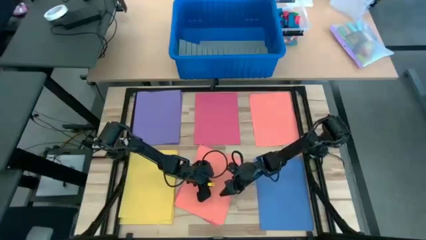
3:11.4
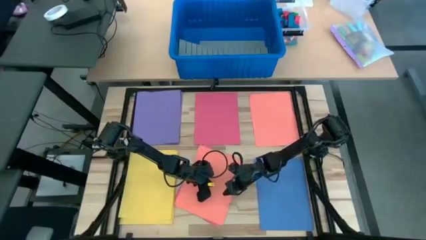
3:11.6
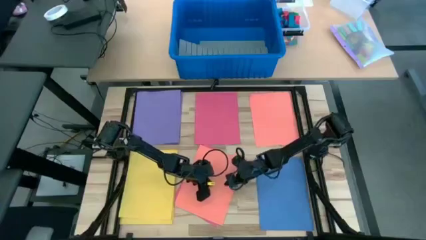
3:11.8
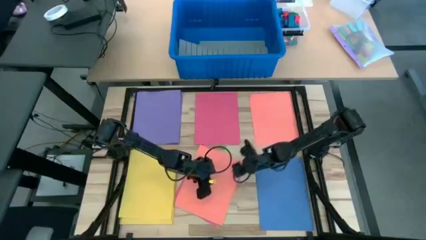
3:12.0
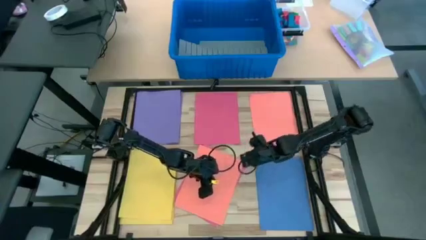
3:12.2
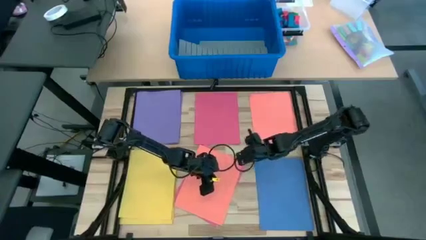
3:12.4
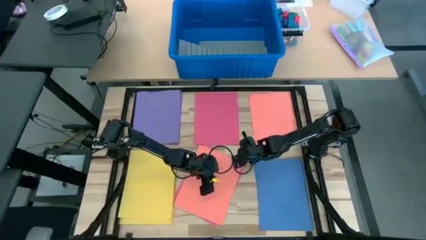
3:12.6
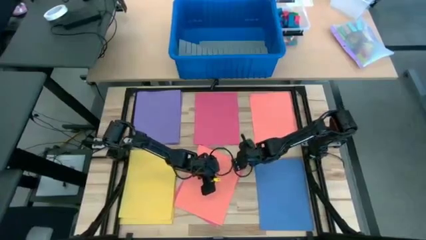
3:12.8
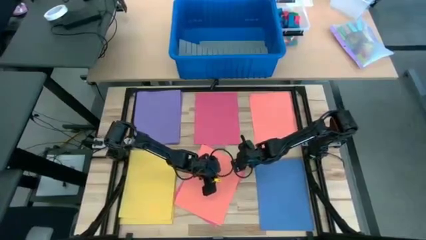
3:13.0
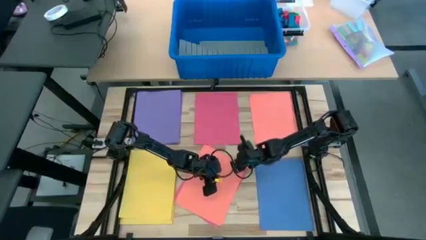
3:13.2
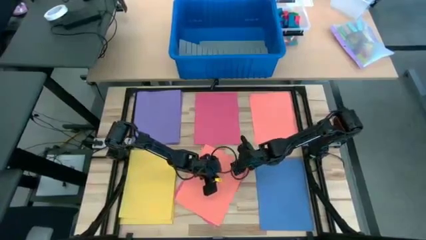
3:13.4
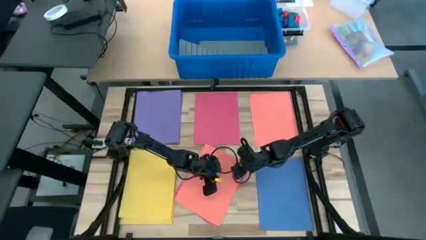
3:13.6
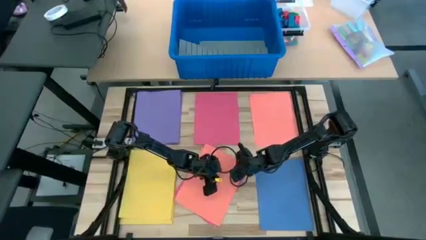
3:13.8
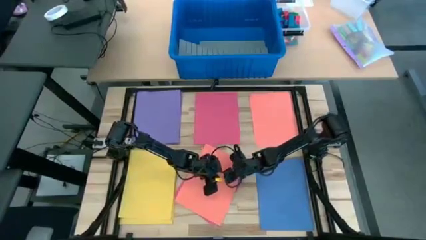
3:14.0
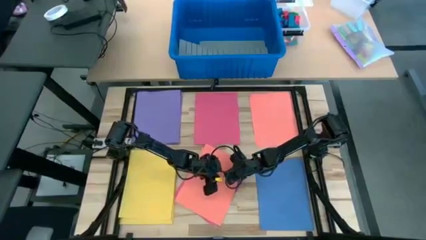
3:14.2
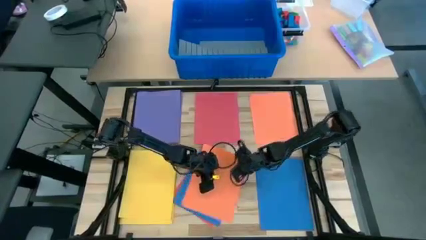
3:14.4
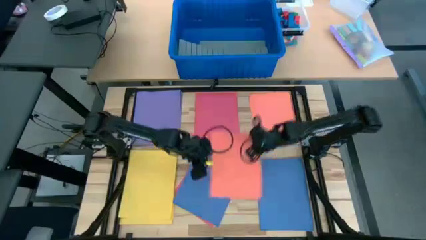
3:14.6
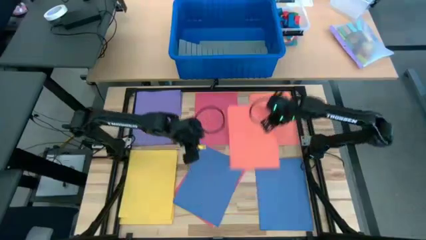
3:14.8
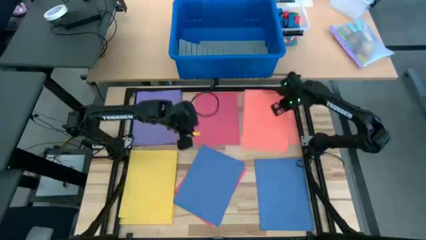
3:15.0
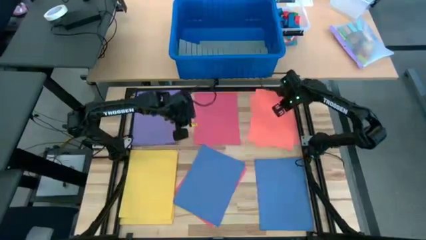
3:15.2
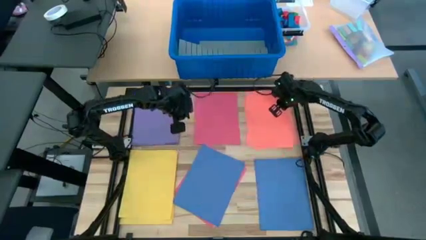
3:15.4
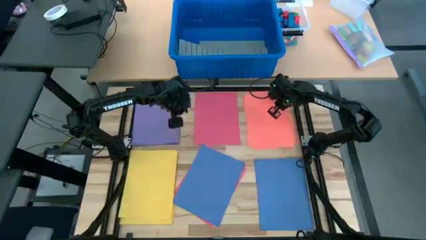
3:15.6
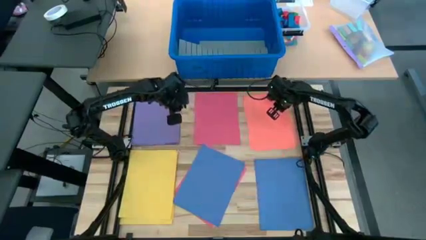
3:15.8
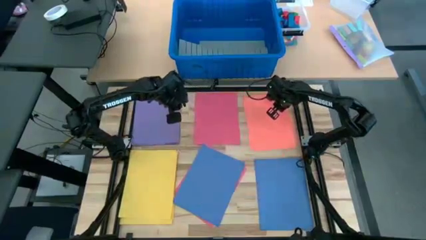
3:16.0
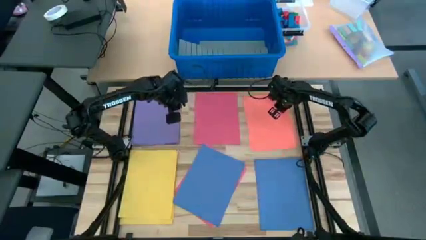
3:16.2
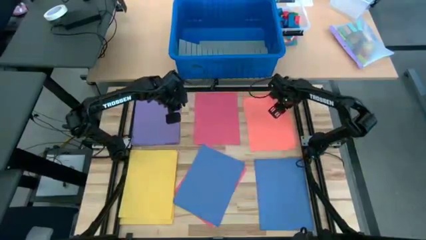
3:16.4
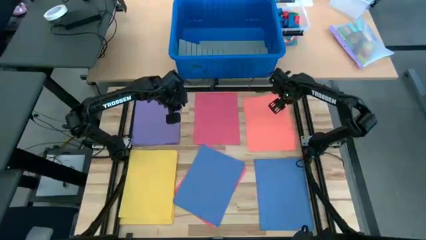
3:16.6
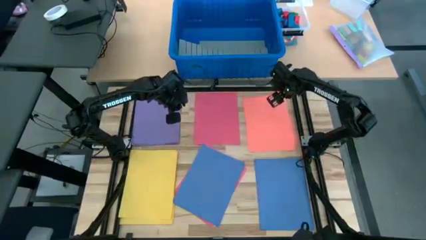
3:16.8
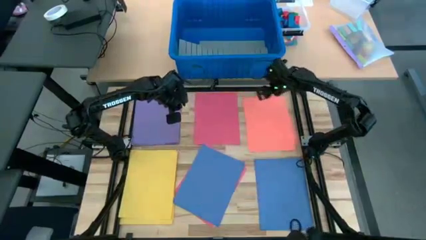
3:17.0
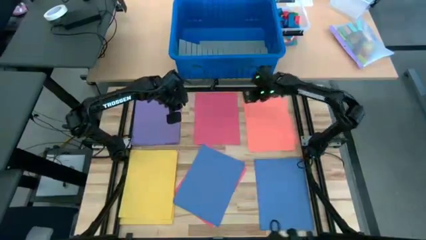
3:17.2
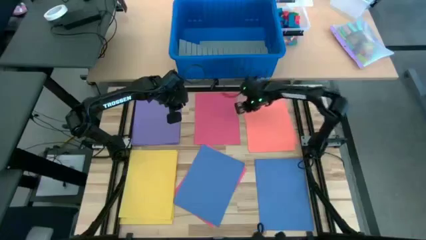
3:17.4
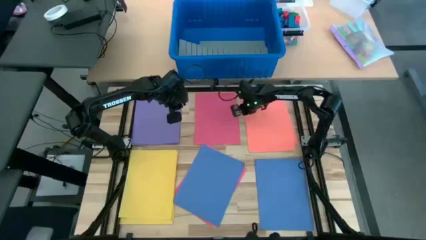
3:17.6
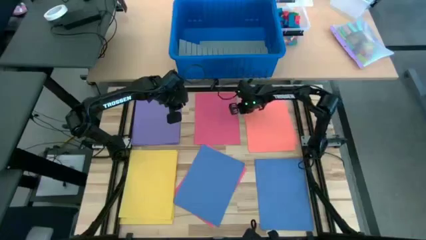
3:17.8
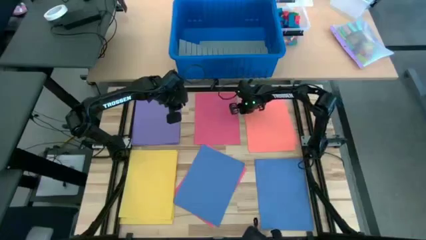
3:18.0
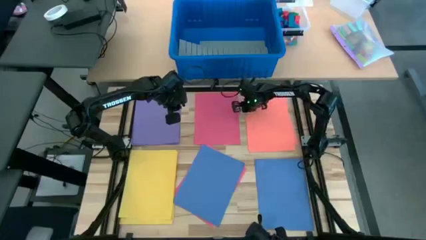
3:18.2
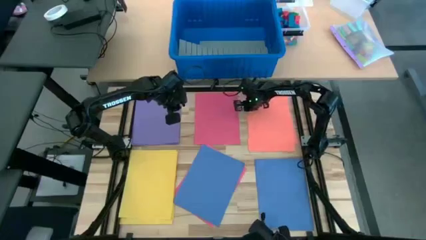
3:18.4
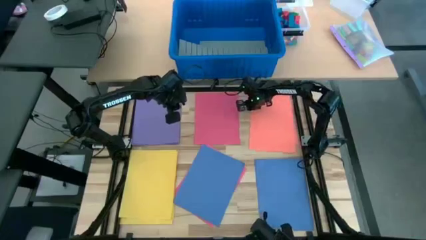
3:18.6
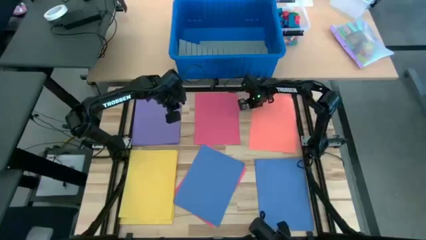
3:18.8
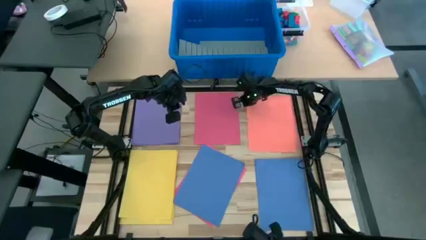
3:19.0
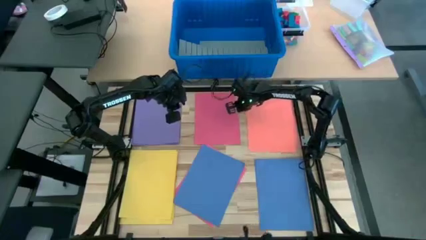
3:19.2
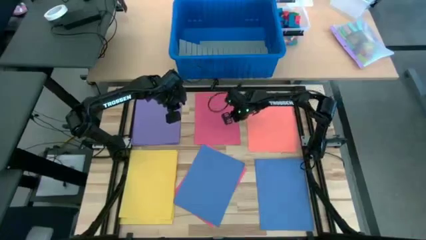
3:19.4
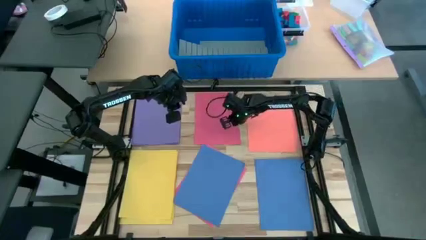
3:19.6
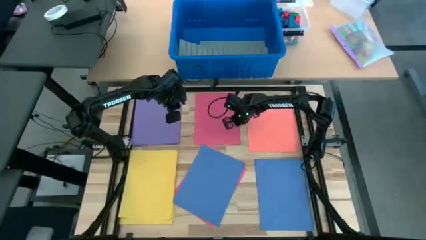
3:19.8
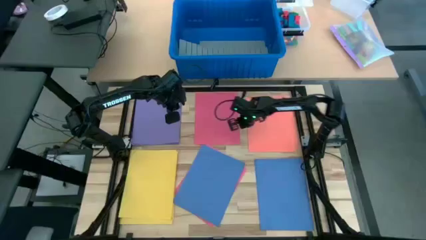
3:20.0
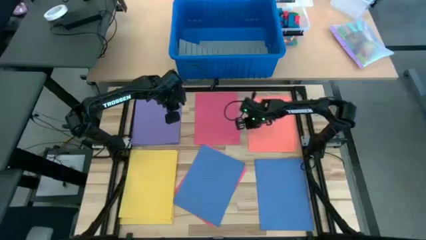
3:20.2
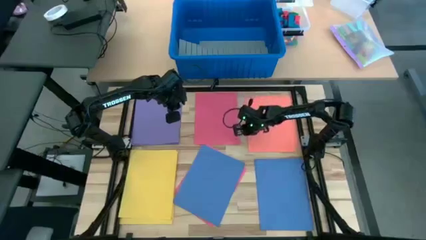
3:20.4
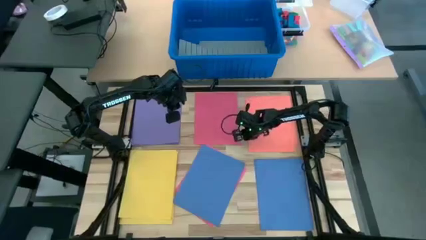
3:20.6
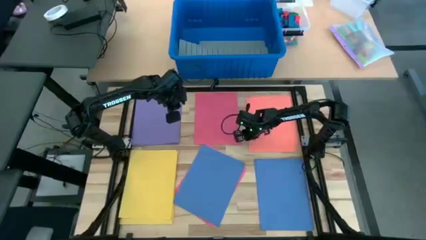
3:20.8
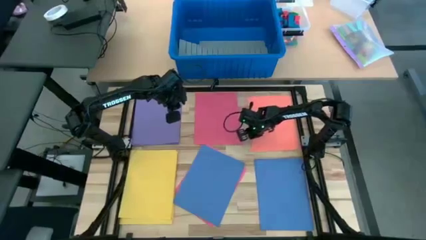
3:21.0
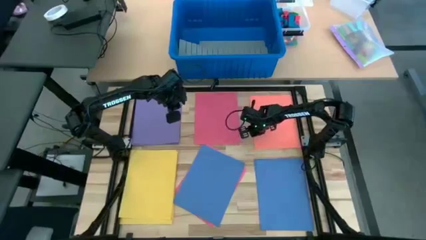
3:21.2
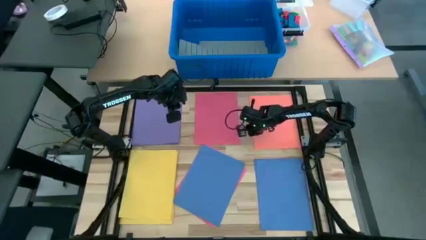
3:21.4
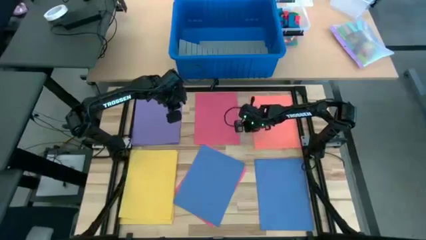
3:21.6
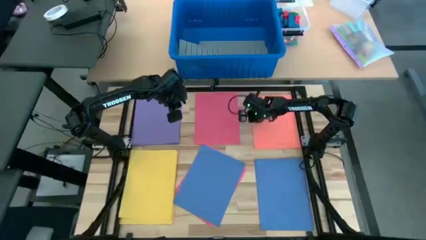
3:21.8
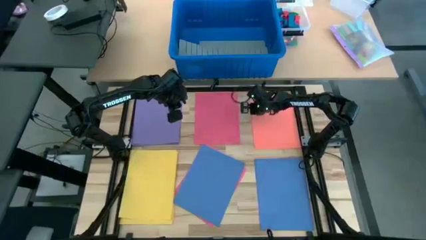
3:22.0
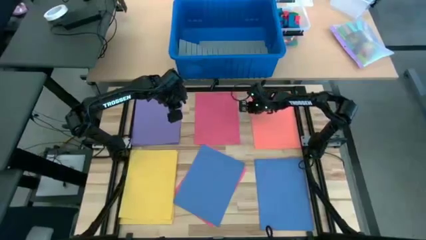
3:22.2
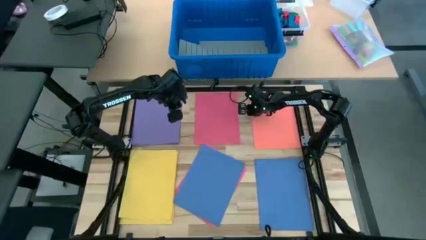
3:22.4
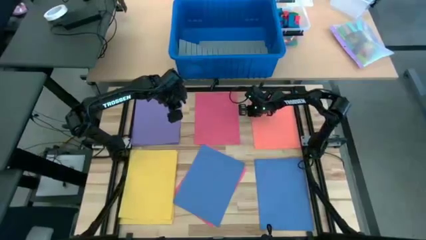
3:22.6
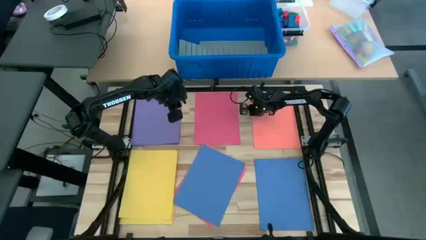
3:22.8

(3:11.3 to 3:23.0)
Task: Organize paper
Stack the orange colored paper on top of the other orange colored paper

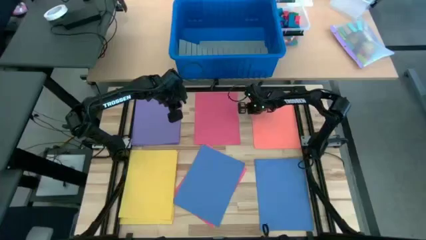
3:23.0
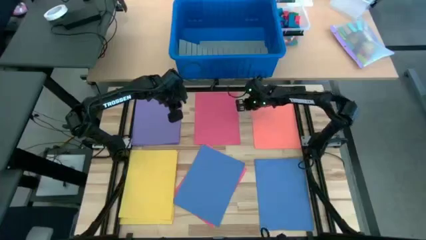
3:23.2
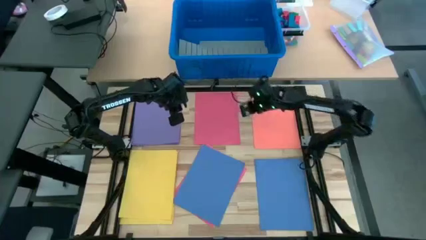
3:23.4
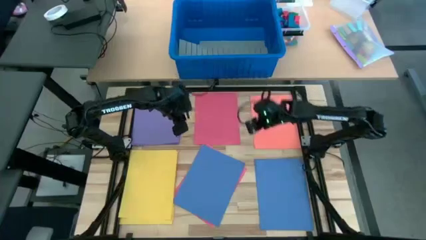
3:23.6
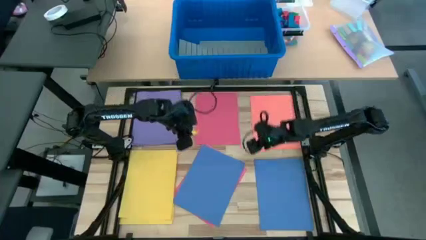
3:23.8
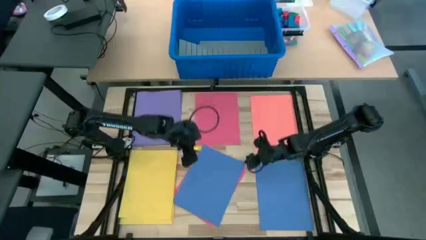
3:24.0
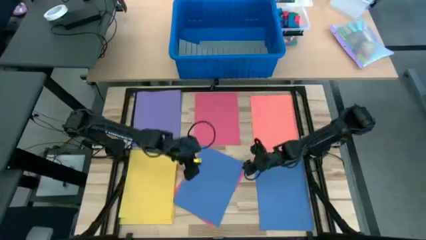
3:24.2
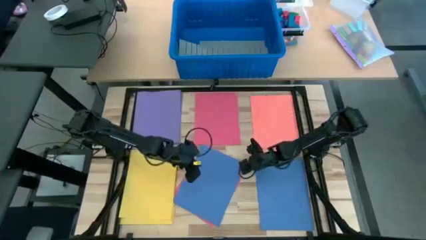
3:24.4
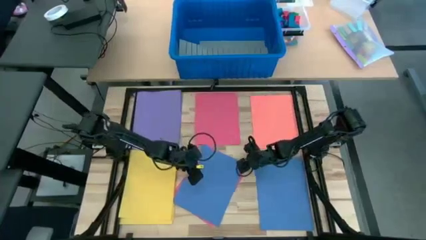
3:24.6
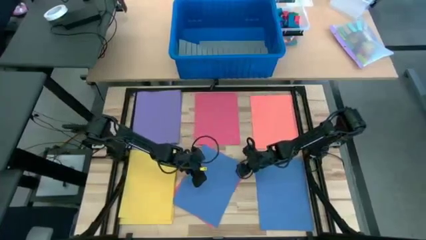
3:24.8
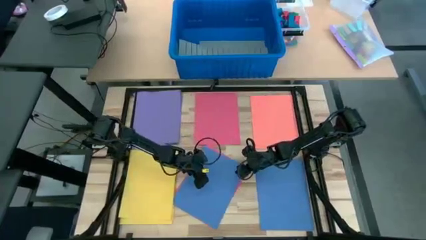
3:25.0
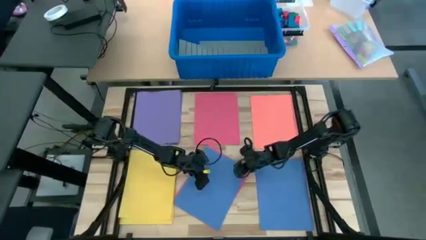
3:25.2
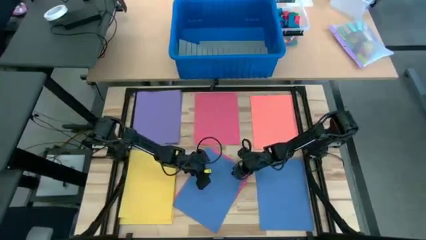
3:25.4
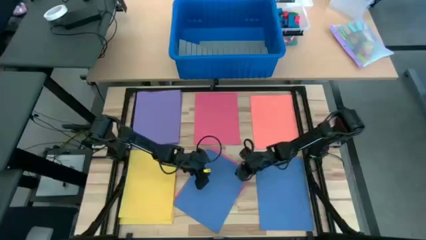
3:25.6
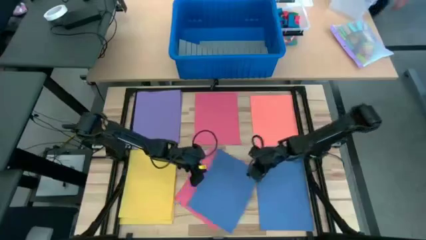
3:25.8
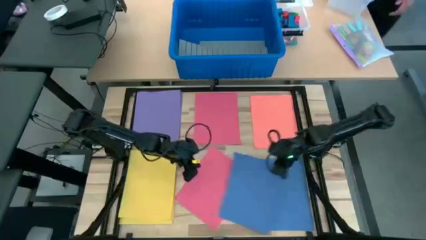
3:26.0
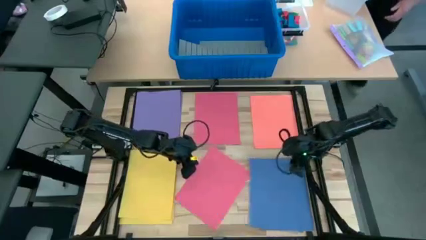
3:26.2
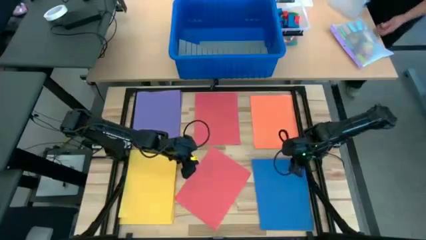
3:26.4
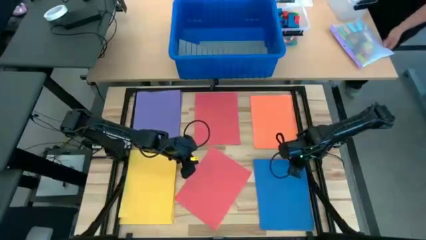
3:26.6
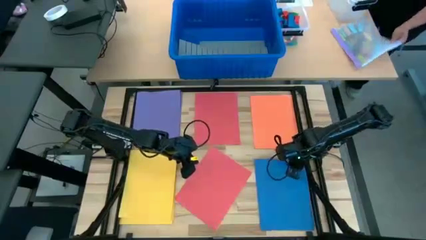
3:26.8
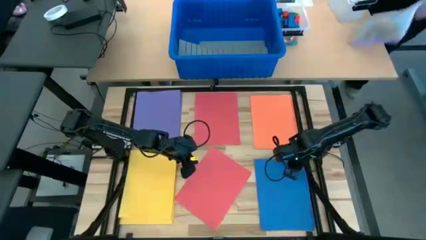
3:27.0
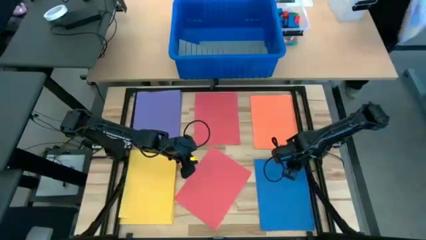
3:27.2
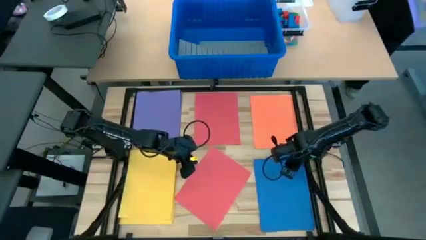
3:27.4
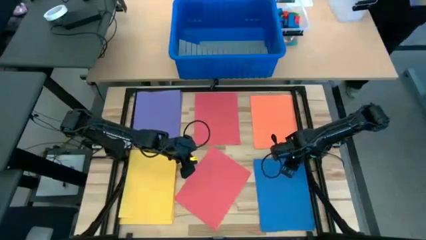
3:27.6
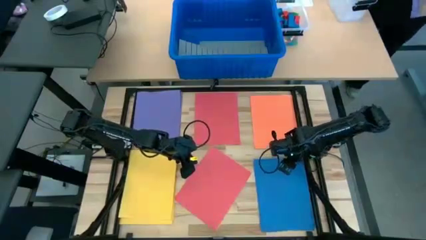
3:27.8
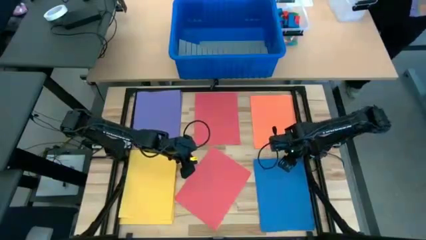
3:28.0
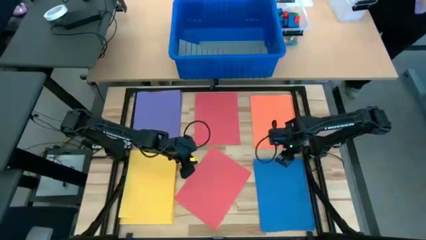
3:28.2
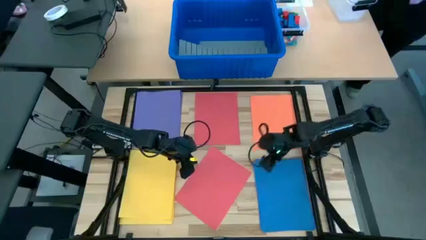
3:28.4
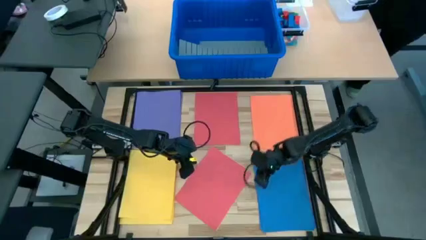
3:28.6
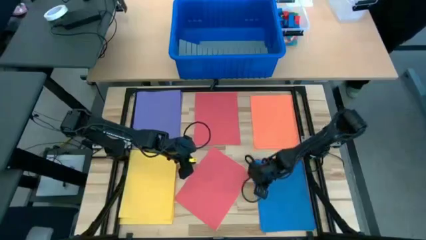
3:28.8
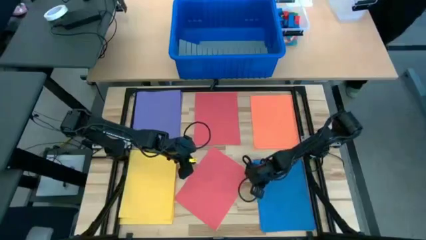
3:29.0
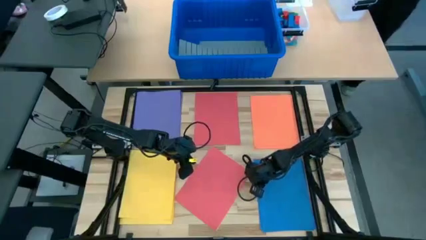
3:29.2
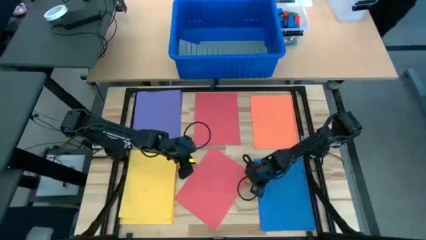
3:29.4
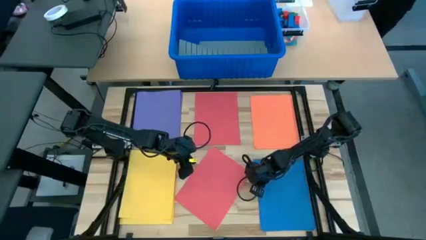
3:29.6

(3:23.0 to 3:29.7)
Stack the blue colored paper on top of the other blue colored papers
